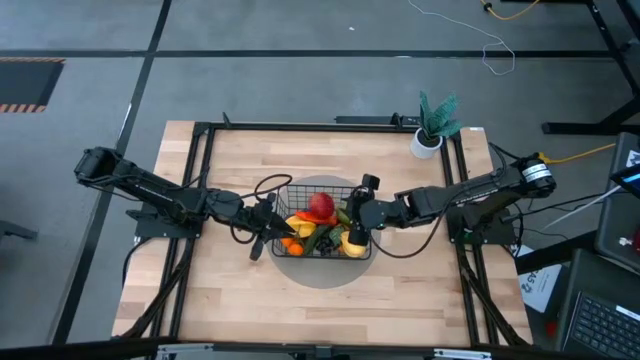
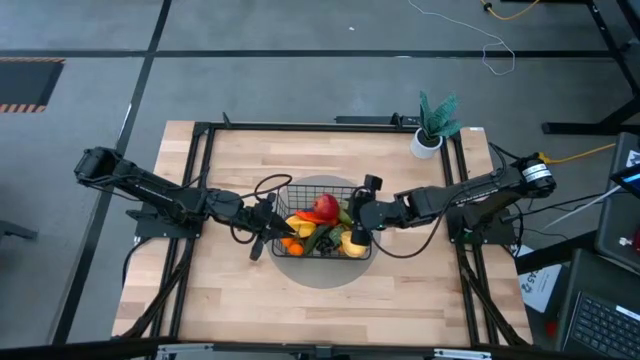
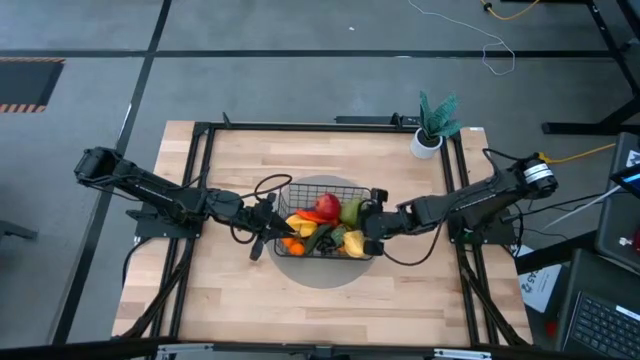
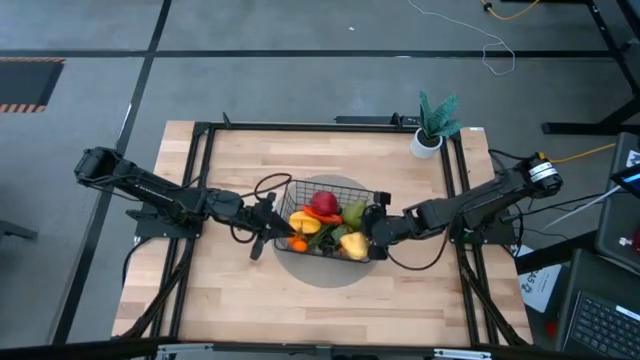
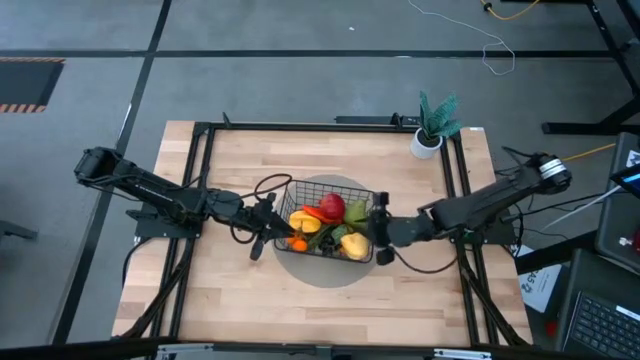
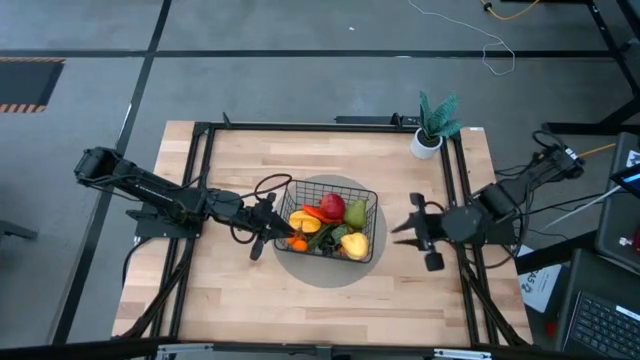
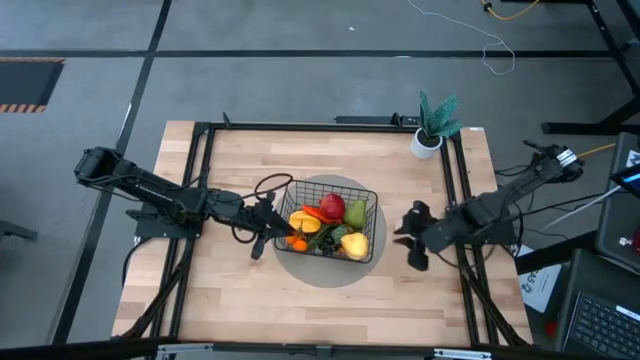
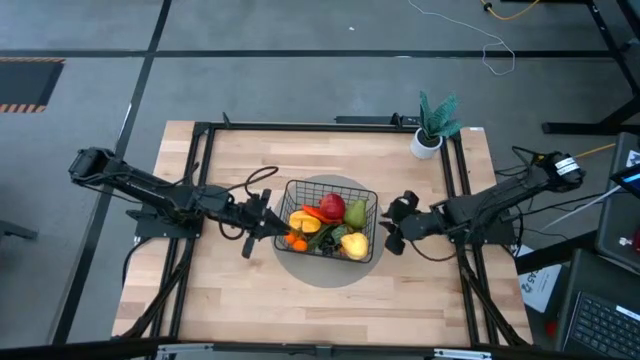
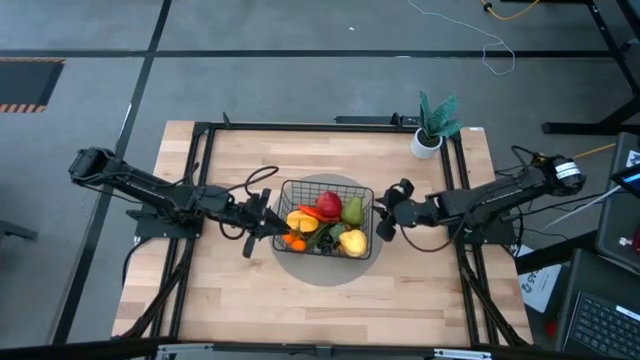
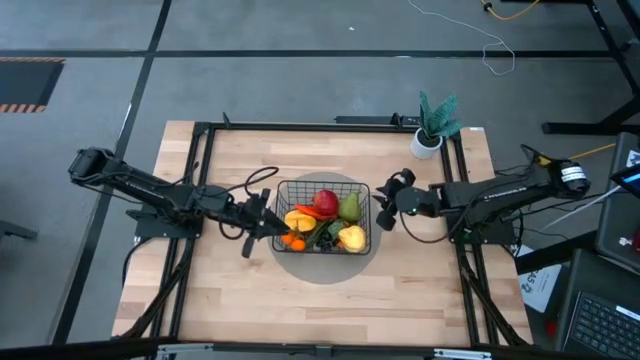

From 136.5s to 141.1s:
Task: Build produce basket
Adjust the black wire basket

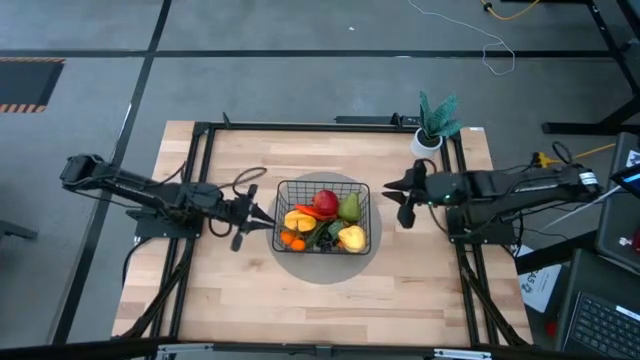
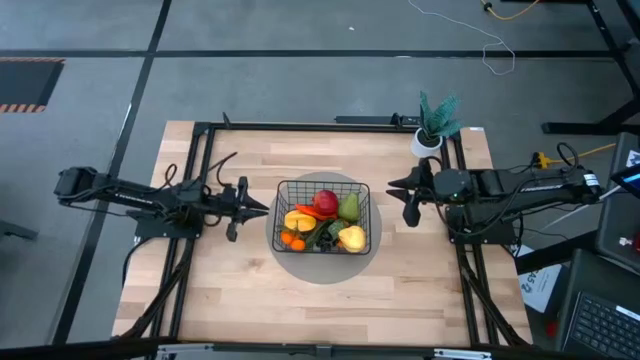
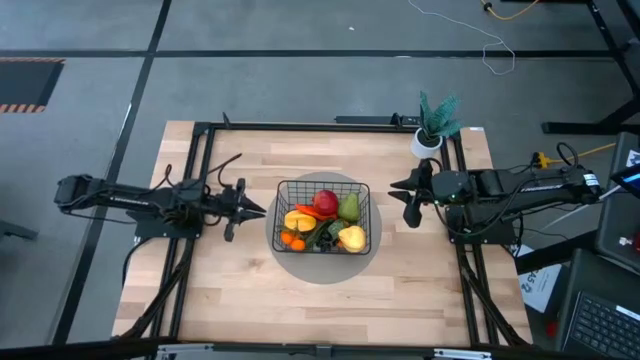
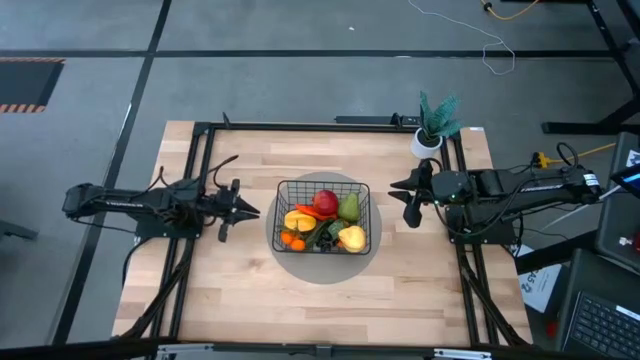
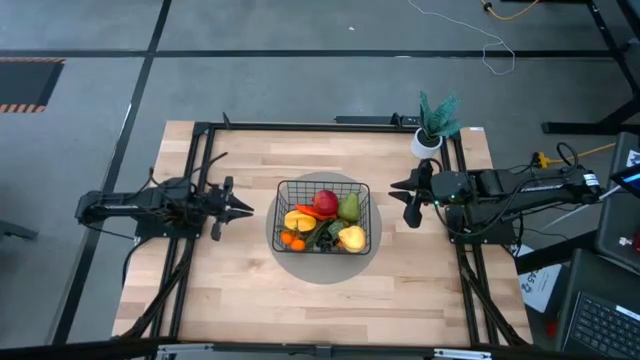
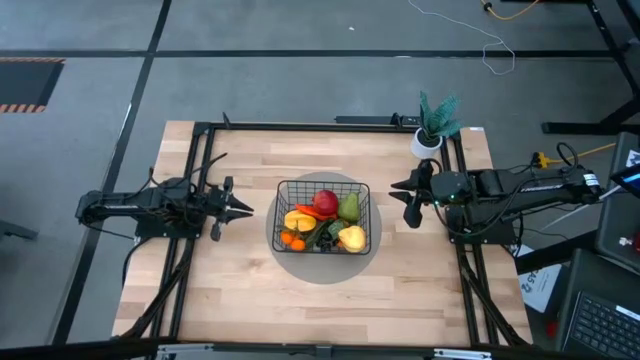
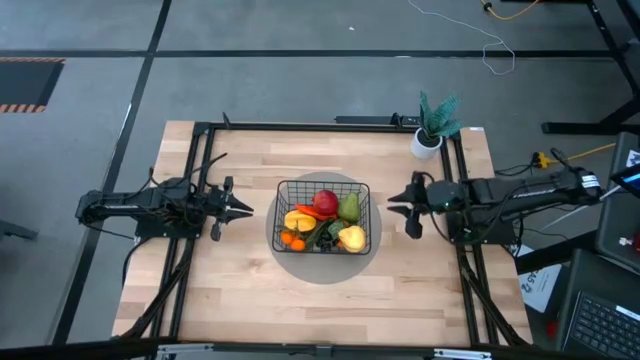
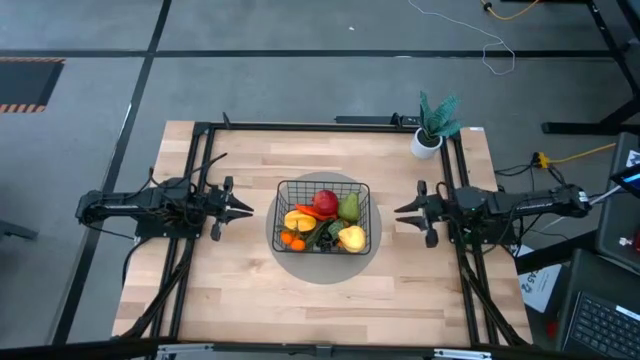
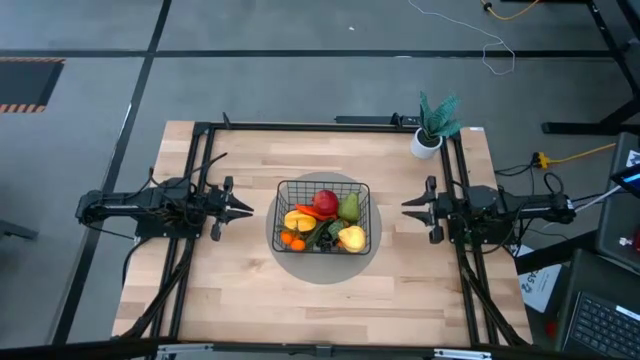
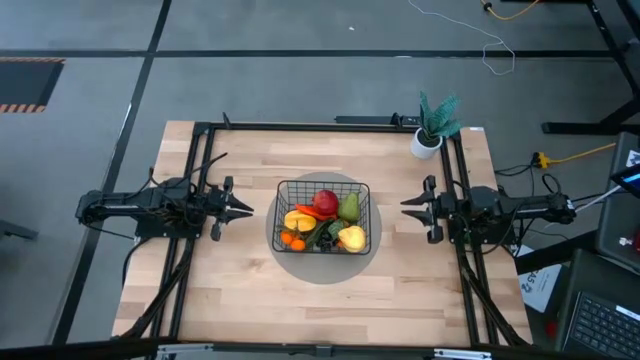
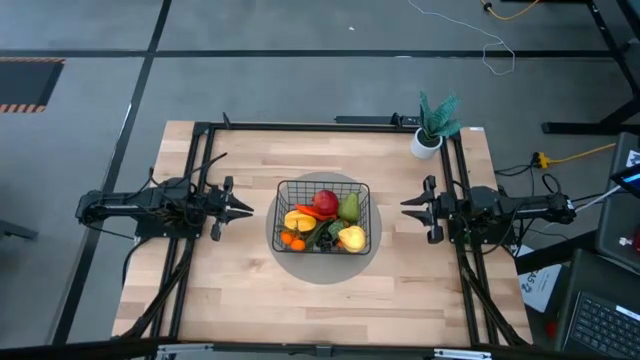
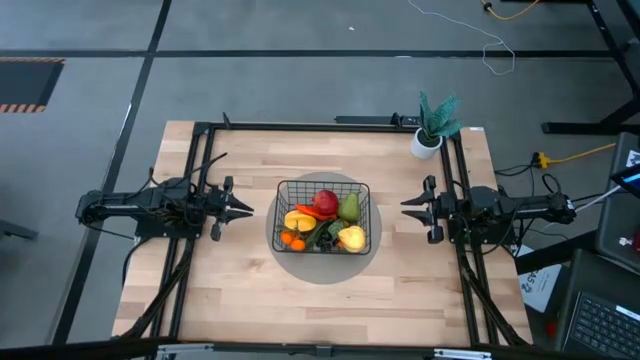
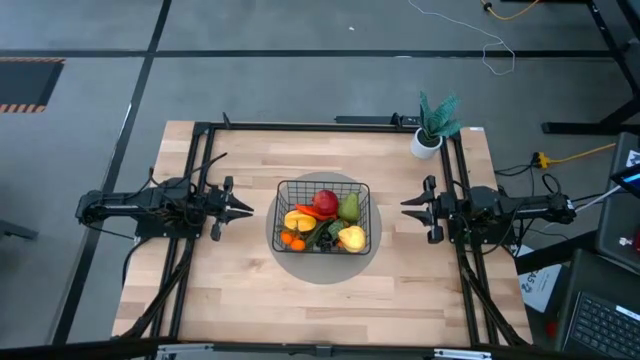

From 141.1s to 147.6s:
Return to Home Position

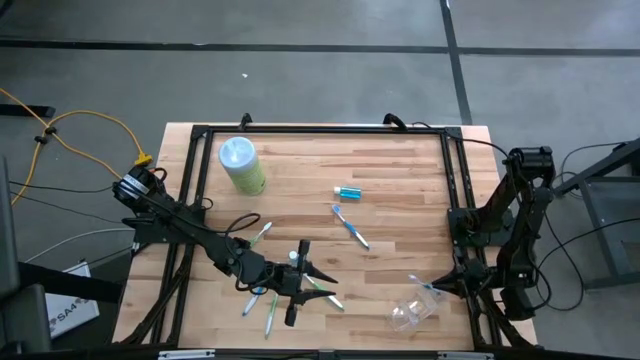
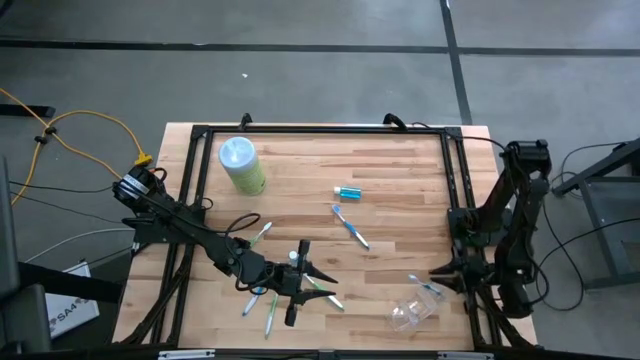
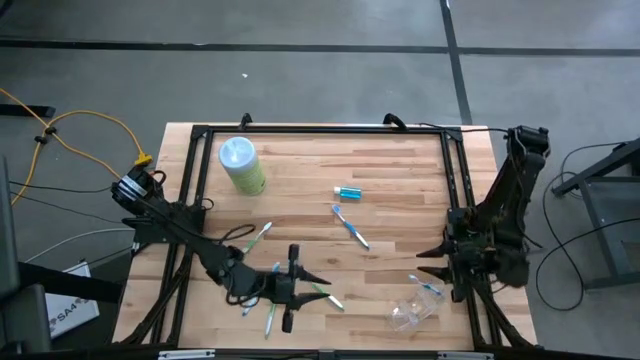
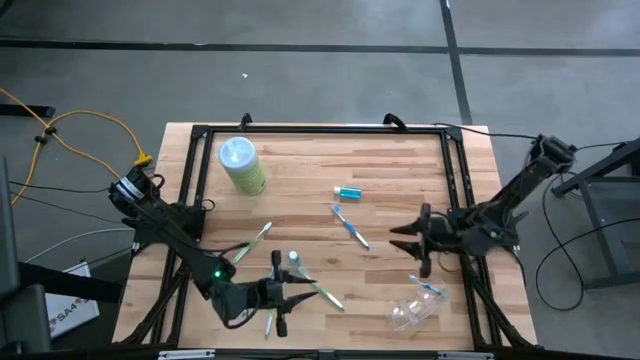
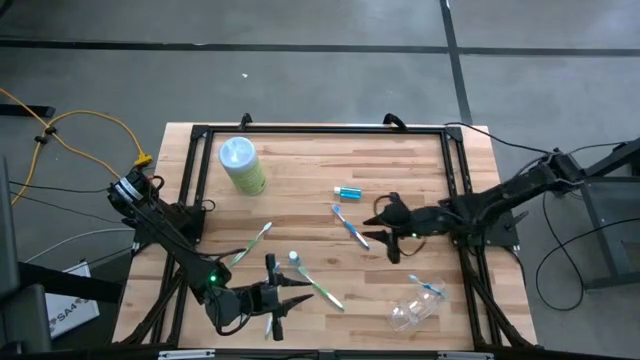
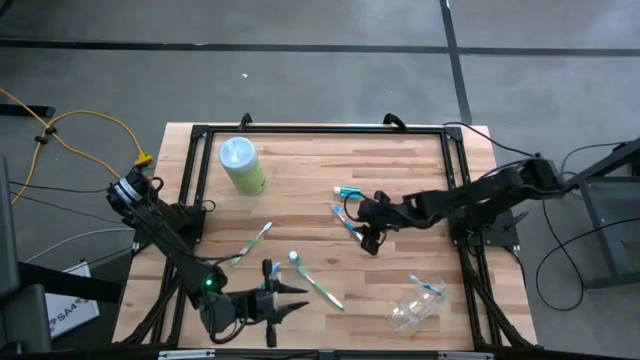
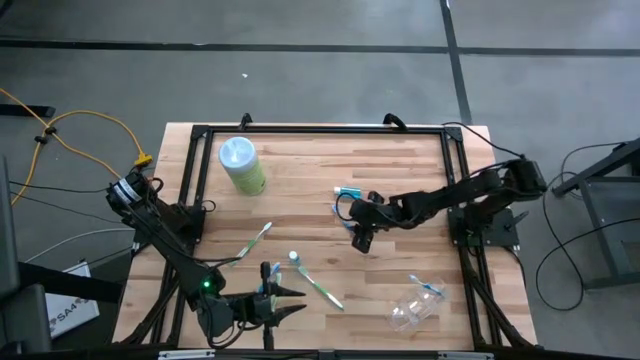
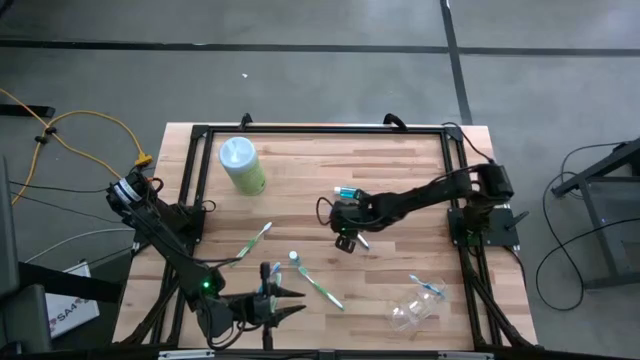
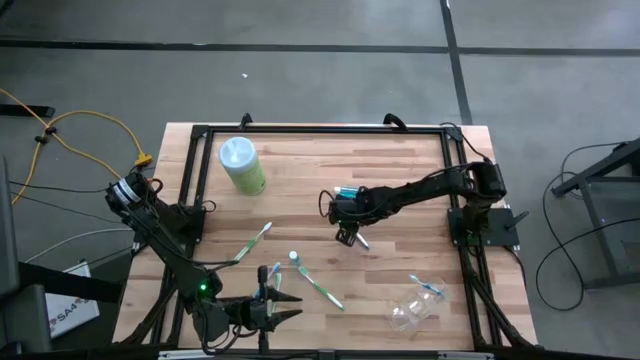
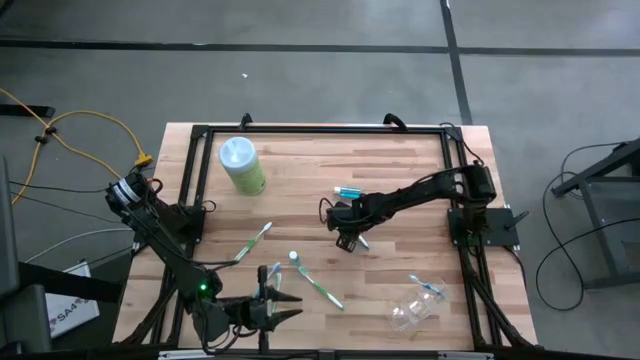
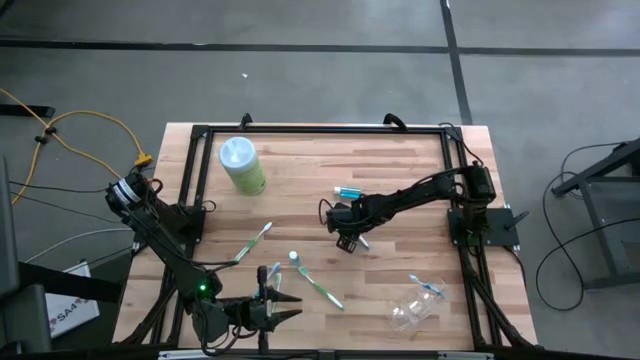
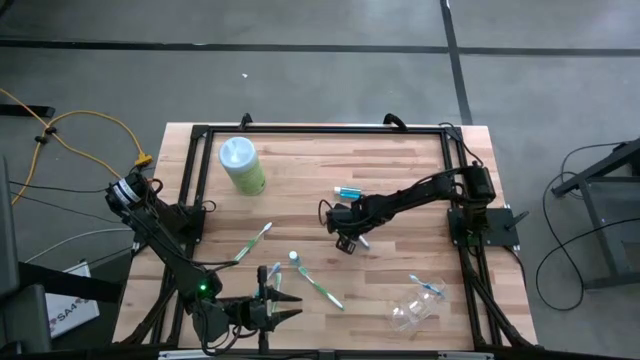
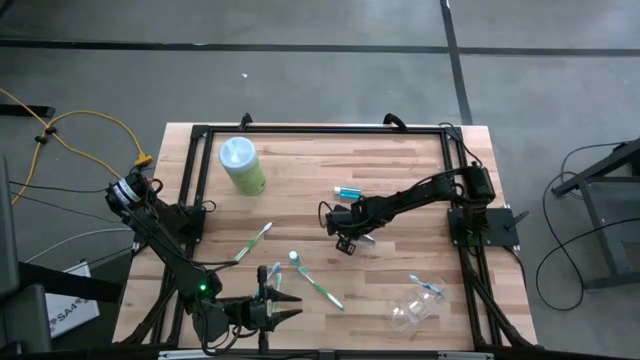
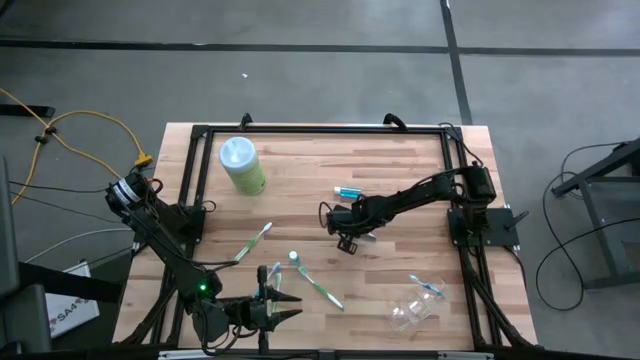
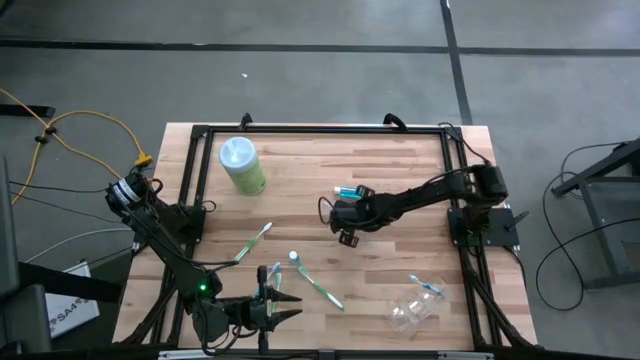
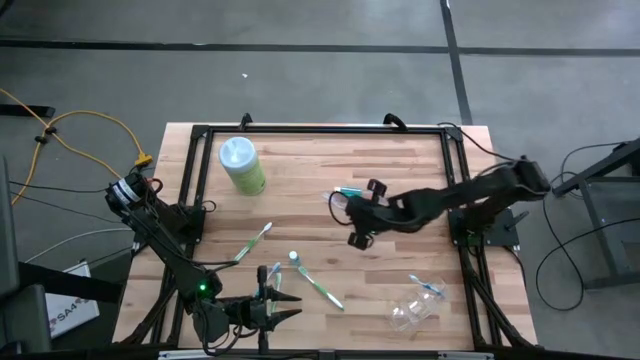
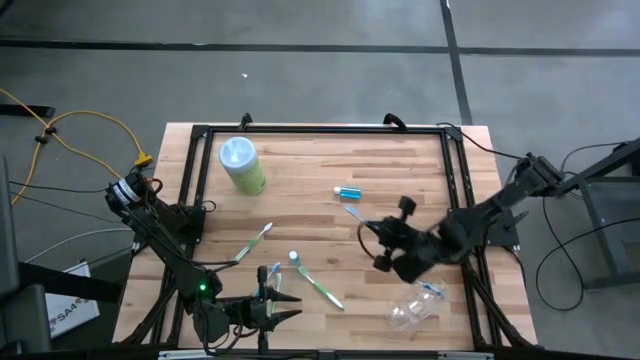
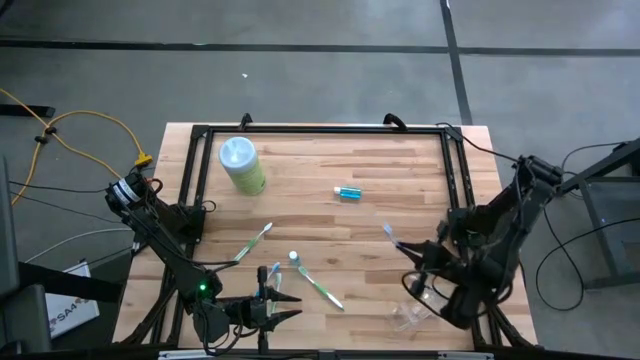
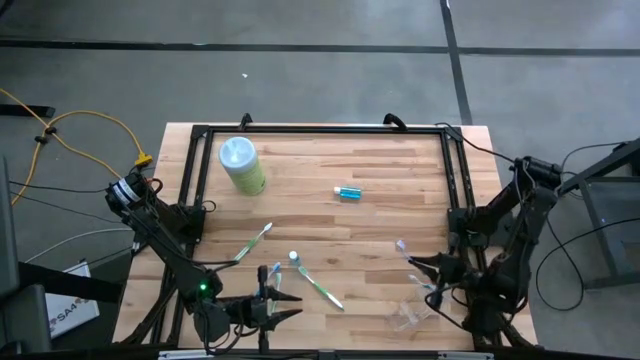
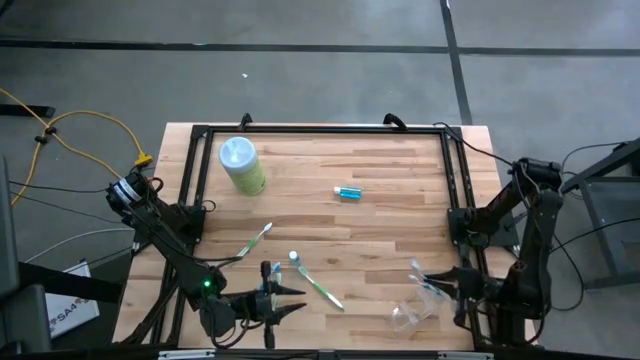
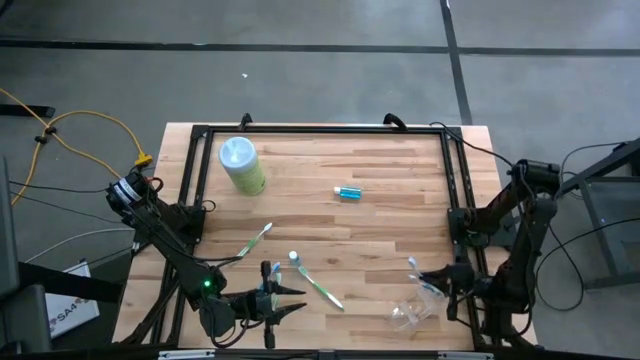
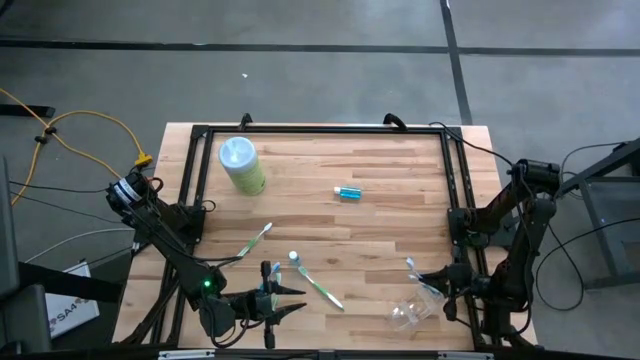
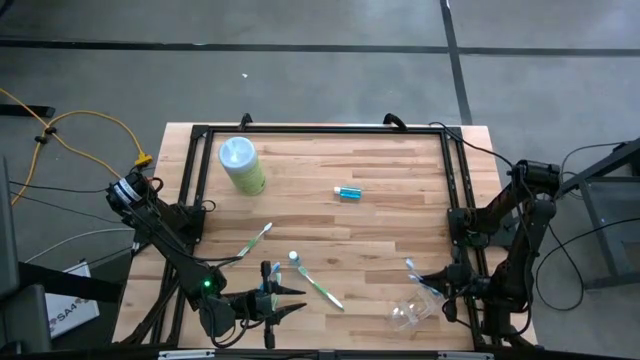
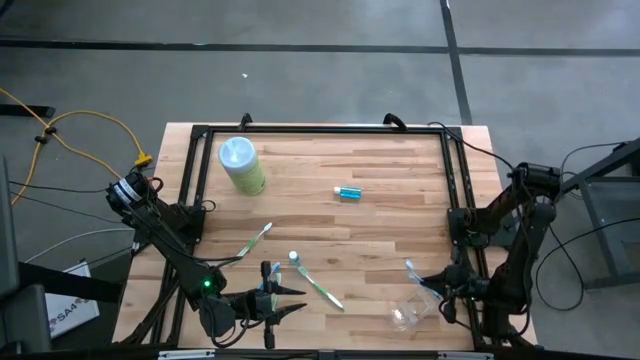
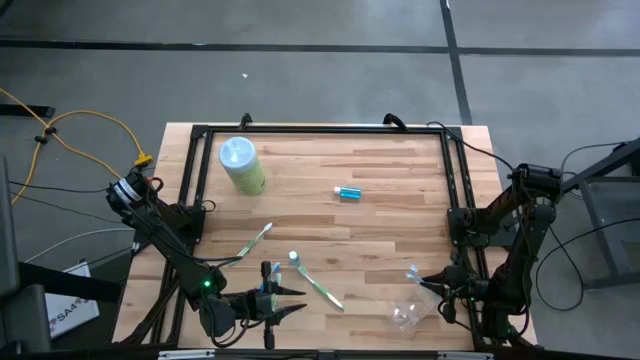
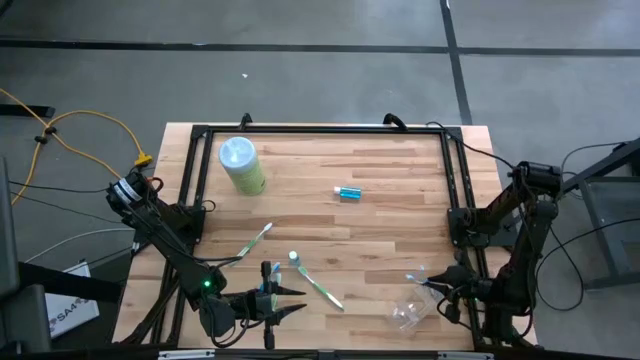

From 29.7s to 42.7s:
Task: Pick & Place toothbrushing station
Put the top blue toothbrush into the right section of the transparent organizer
